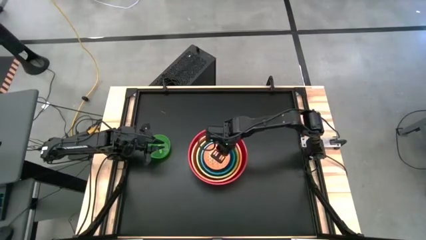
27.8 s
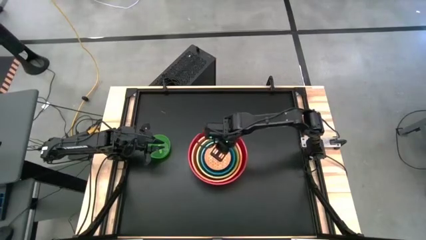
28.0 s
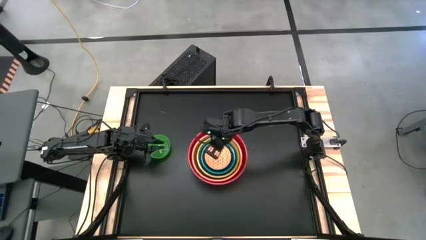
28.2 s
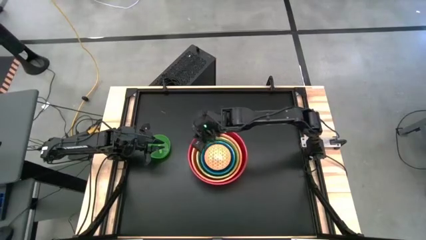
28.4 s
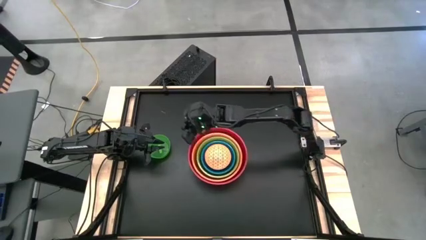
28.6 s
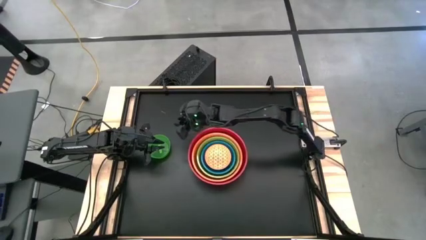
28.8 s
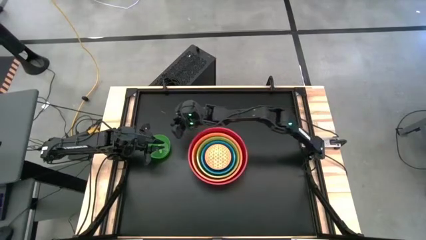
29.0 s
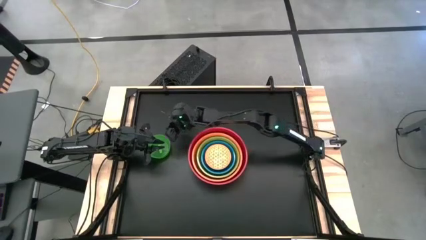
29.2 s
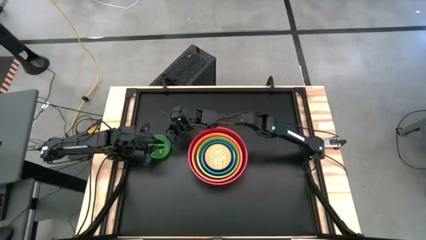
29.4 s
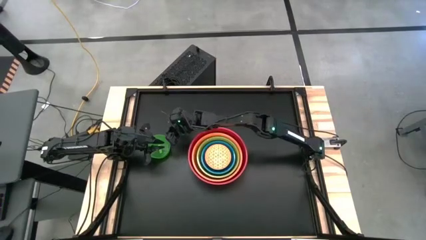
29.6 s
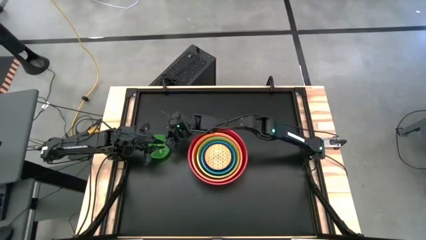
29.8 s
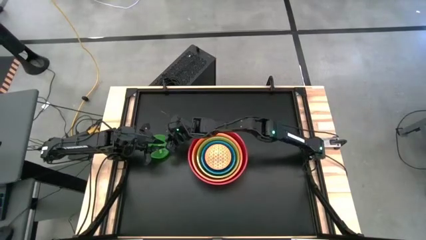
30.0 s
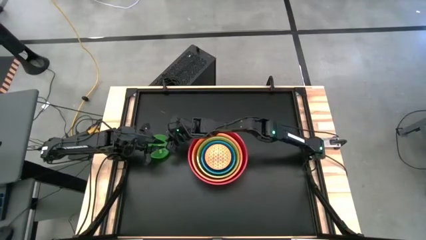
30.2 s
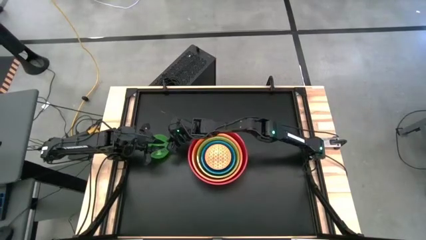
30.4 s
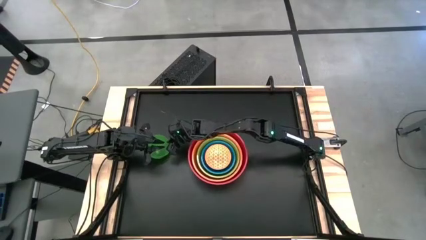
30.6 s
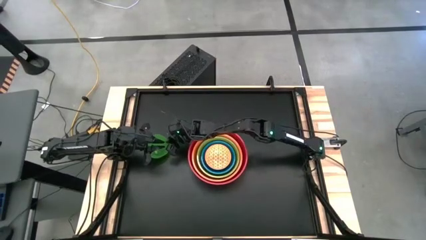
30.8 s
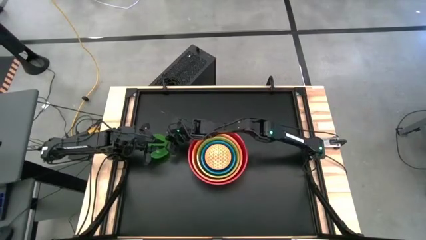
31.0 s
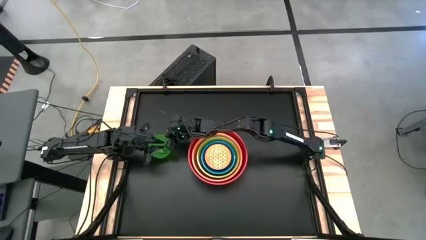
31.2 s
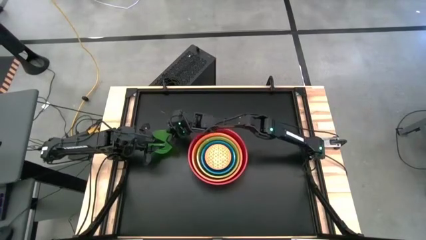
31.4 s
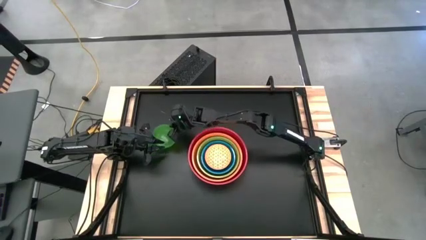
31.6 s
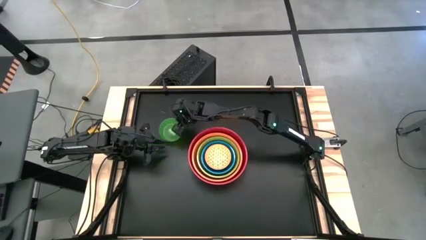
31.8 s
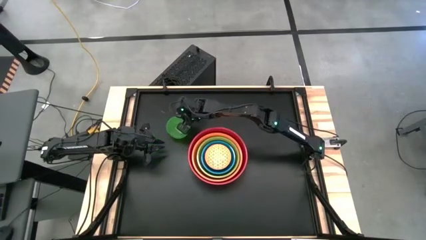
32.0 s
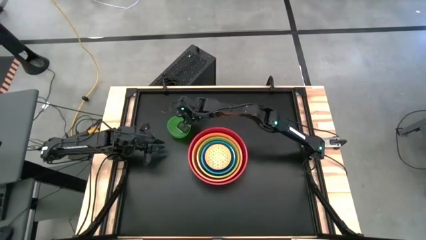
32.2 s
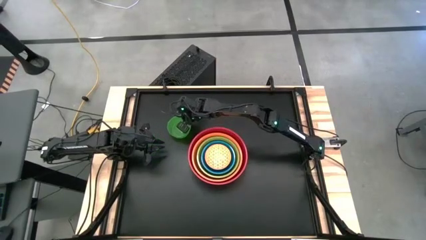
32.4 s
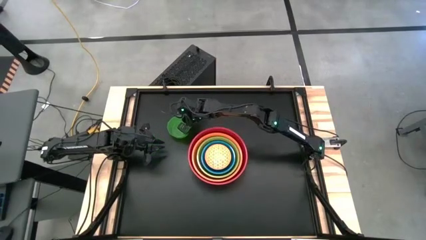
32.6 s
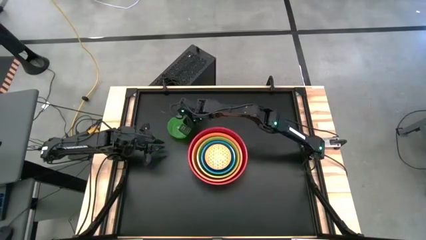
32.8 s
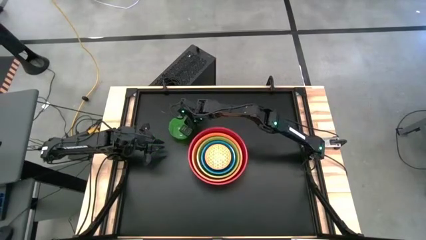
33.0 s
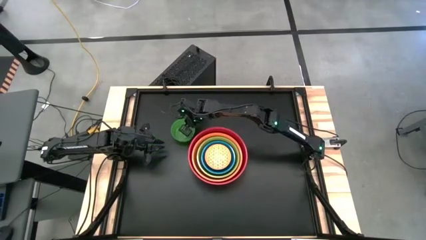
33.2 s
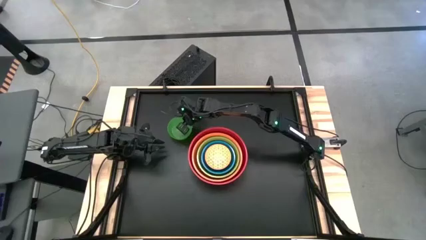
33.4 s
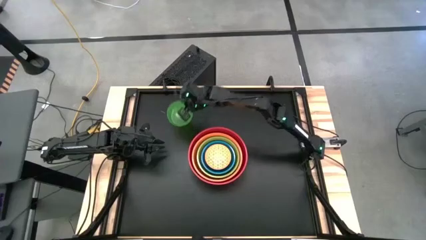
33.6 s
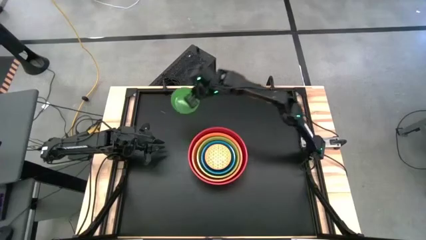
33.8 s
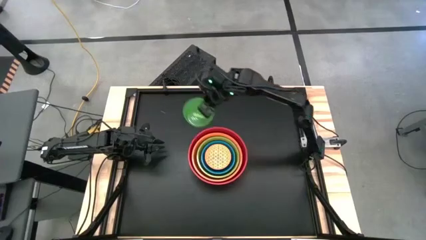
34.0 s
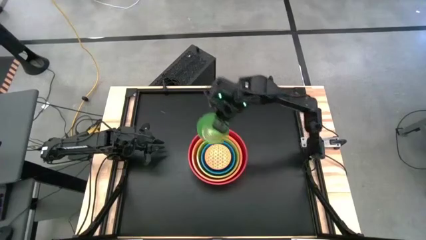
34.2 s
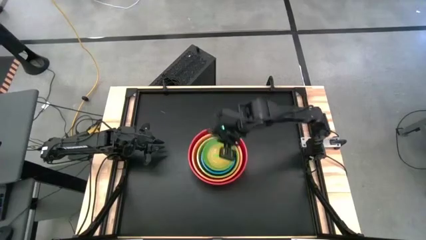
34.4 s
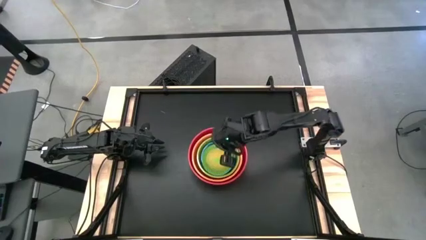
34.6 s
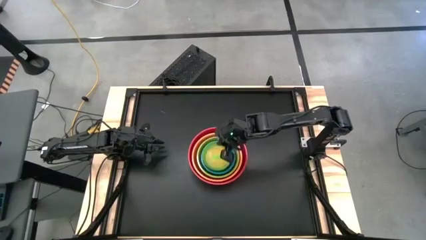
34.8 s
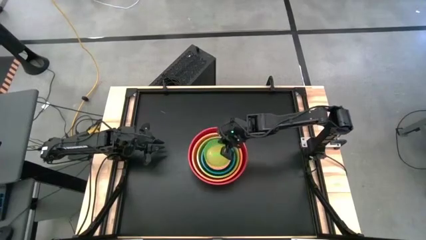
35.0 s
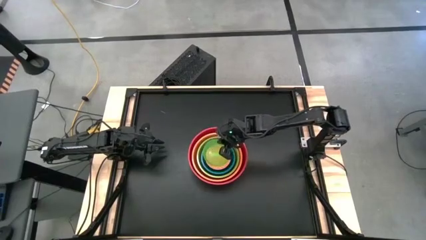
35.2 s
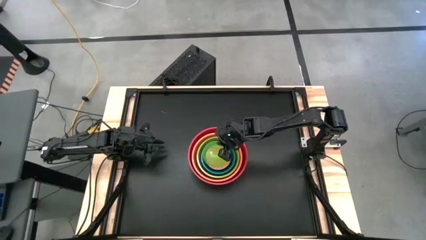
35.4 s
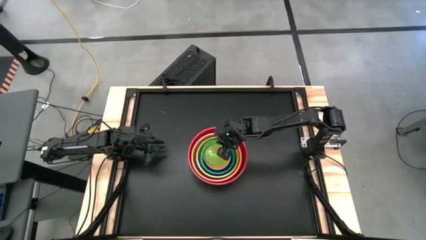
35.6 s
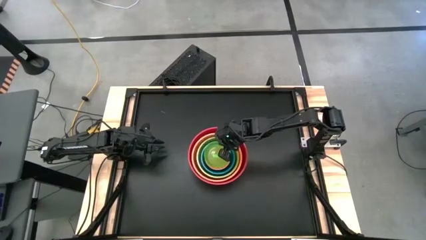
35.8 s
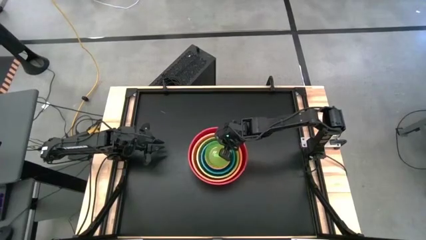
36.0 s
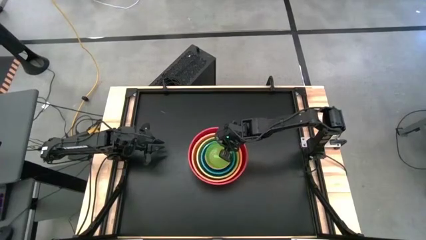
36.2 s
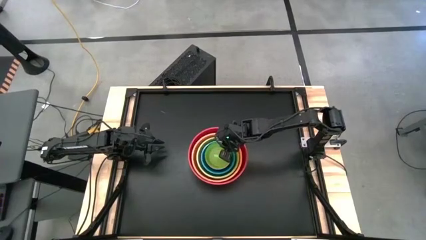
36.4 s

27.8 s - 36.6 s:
Stack the green bowl on top of the orange patterned bowl

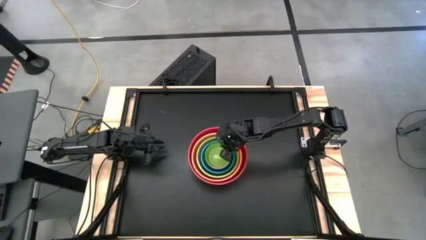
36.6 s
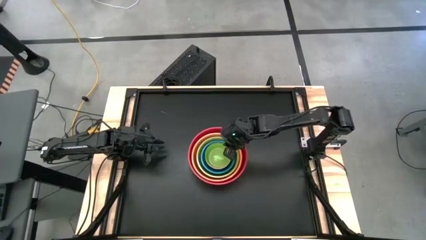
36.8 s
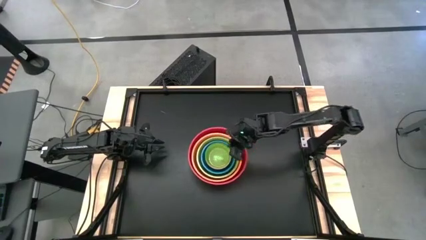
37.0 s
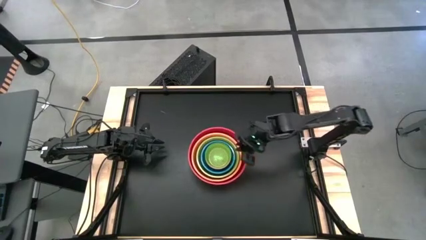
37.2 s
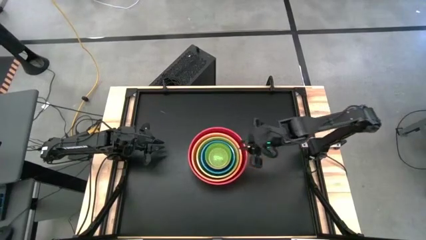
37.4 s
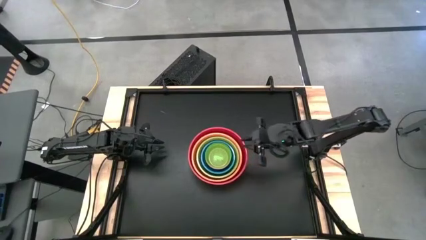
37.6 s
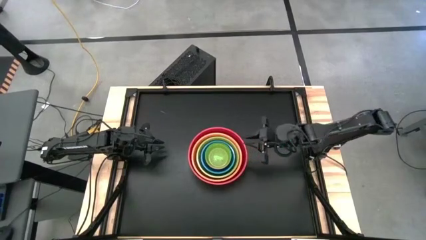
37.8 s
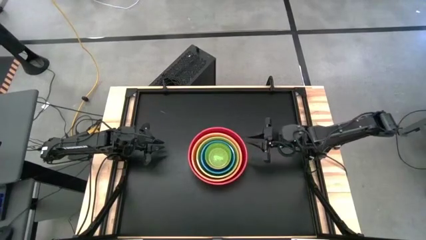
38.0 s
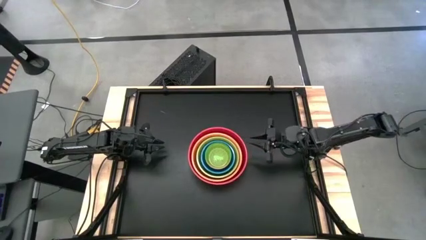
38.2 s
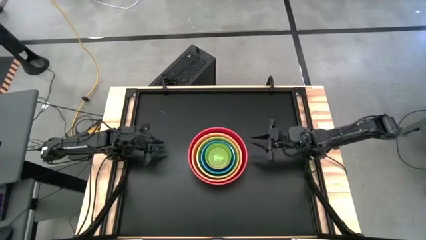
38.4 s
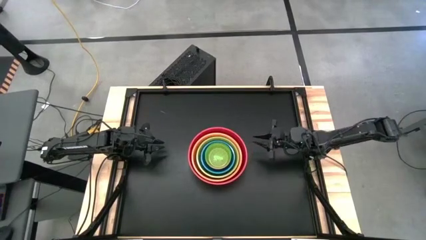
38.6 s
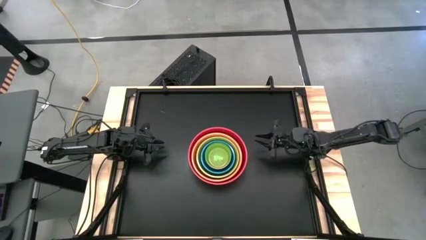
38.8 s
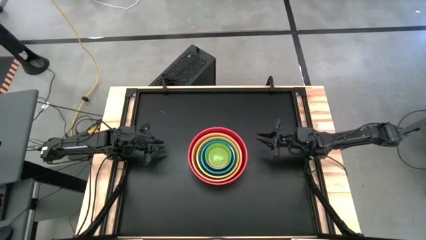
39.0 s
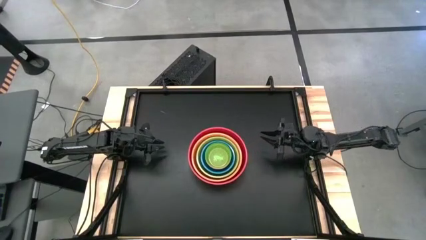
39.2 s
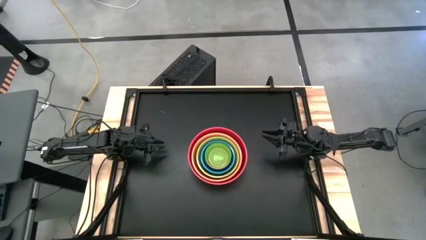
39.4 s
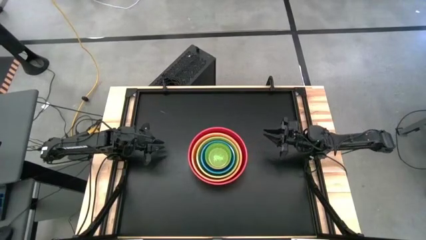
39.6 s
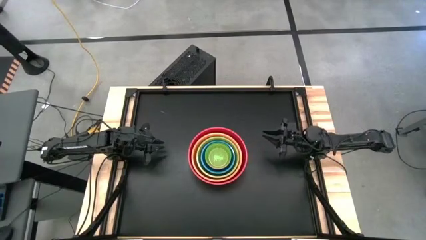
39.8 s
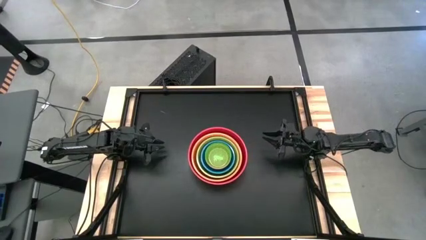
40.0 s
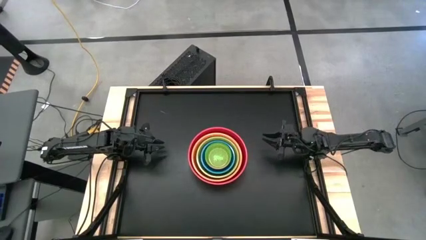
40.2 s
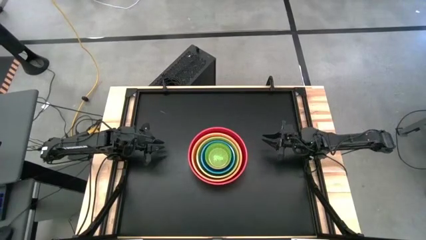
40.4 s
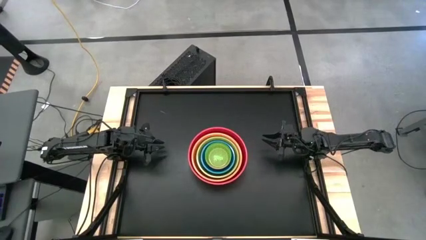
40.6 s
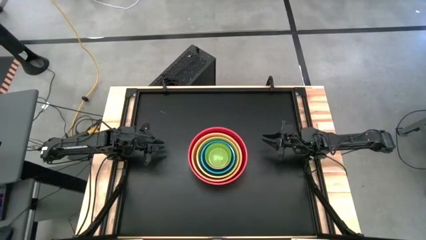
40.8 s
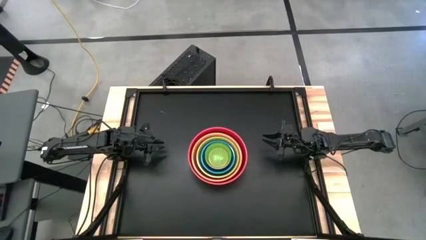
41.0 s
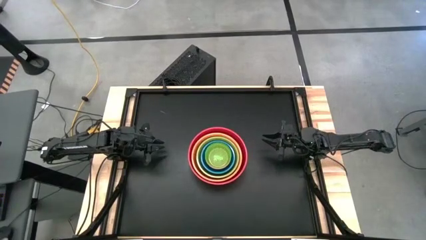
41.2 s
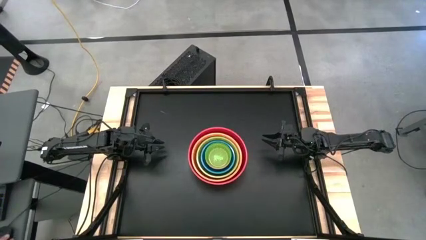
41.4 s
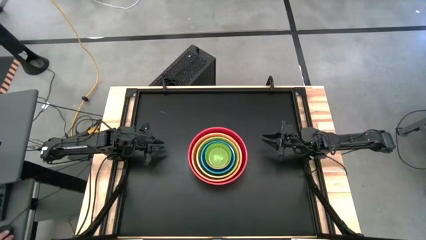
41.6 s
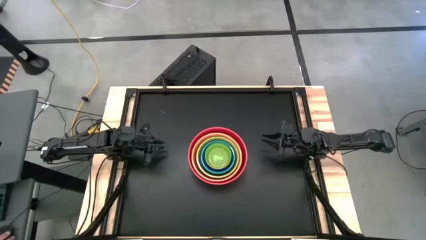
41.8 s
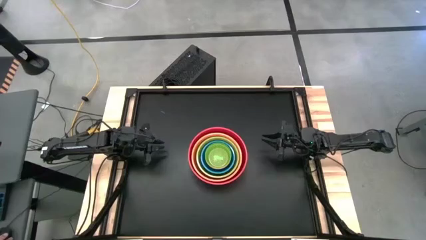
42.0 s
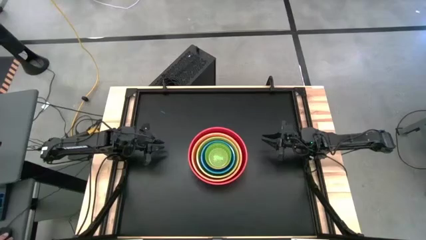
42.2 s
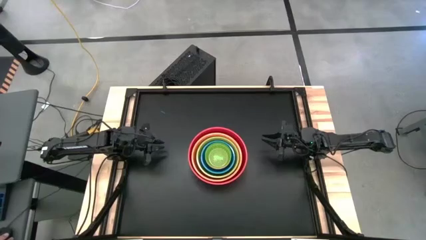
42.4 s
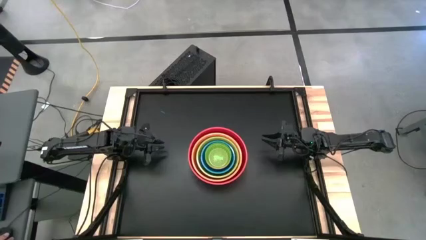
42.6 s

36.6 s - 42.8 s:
Return to Home Position
